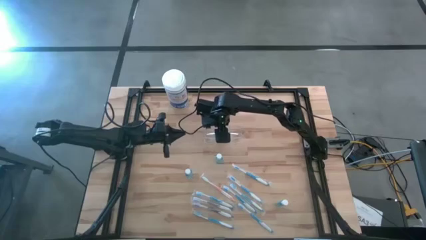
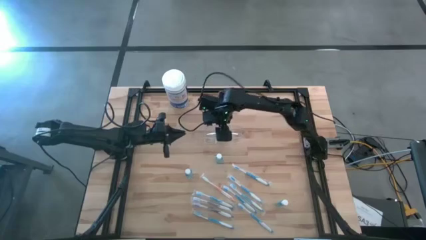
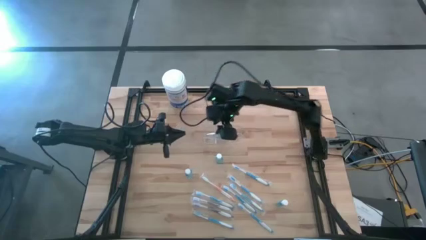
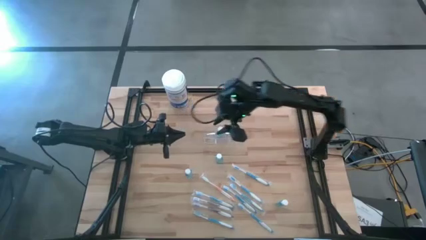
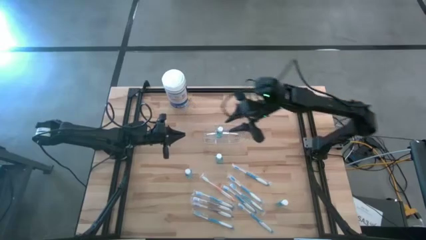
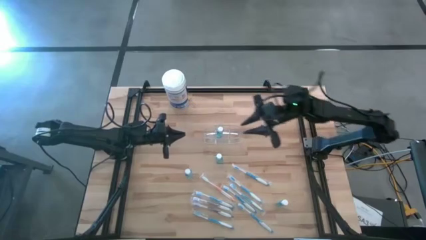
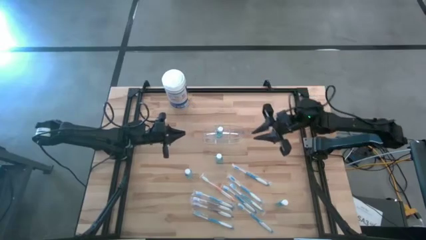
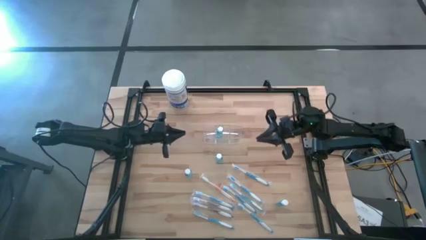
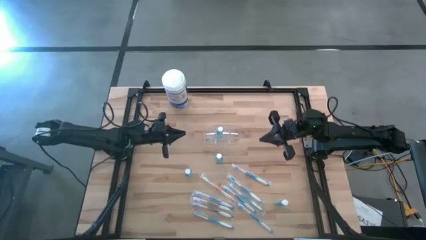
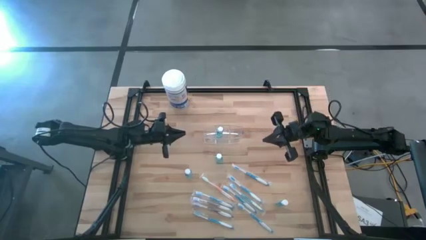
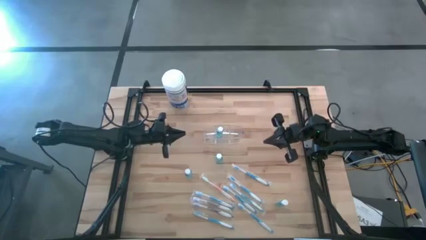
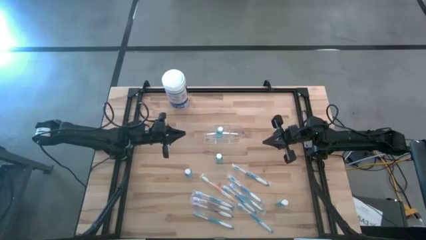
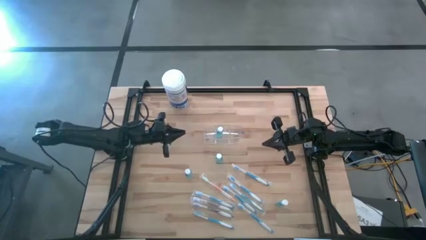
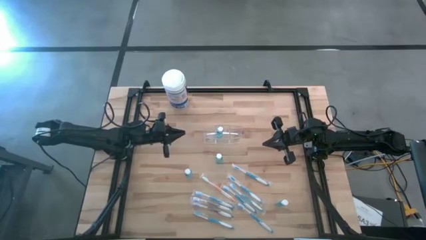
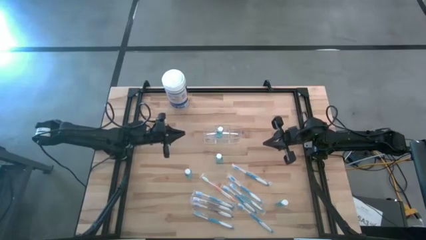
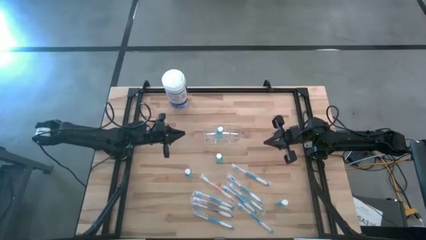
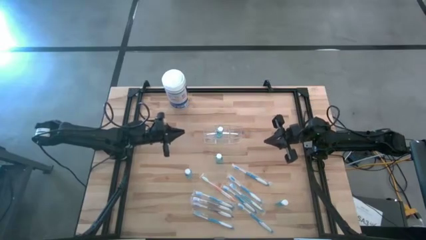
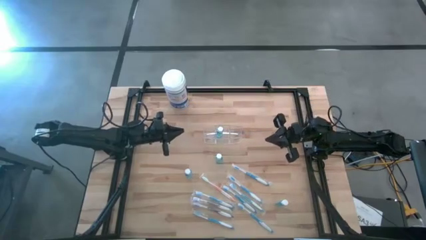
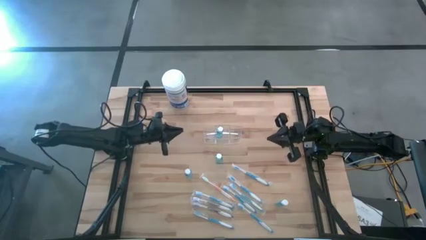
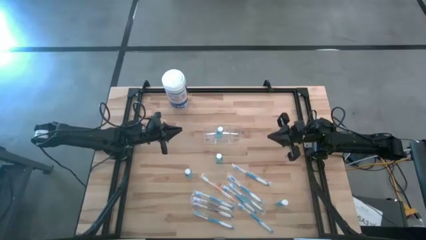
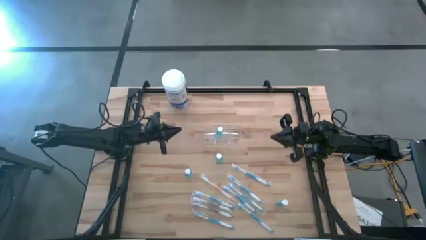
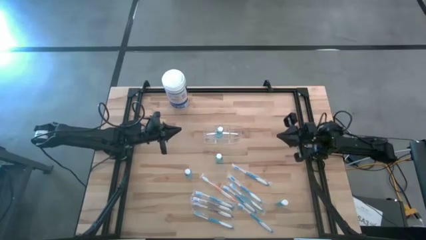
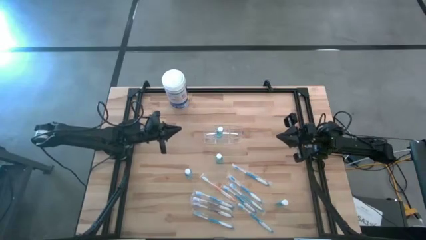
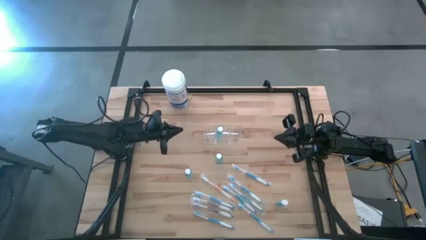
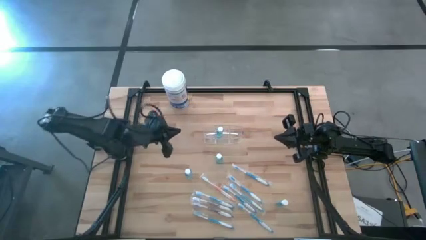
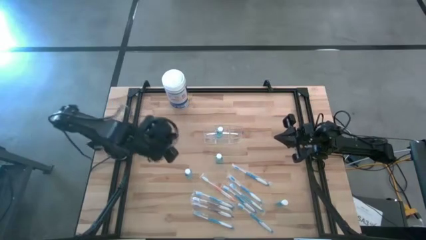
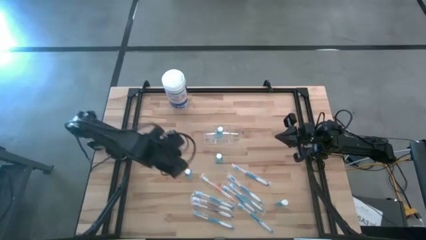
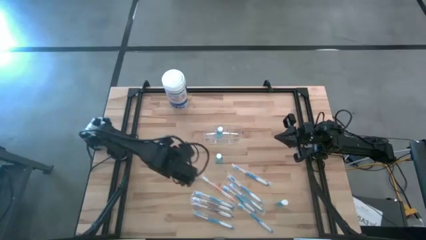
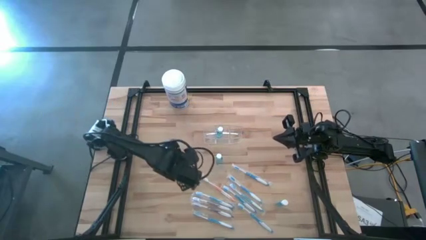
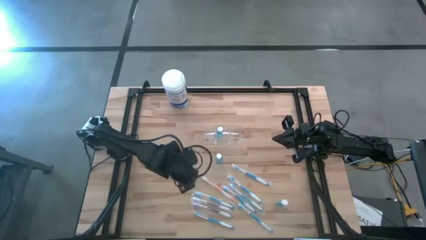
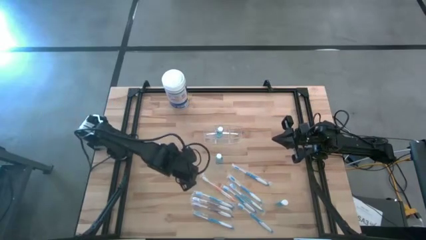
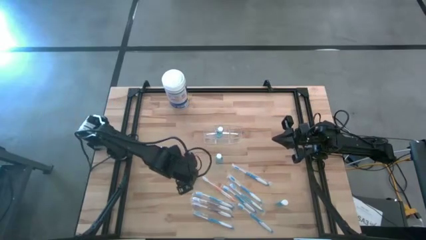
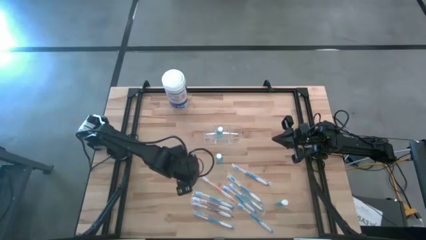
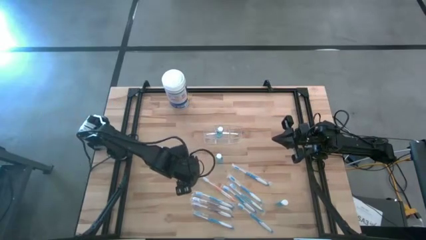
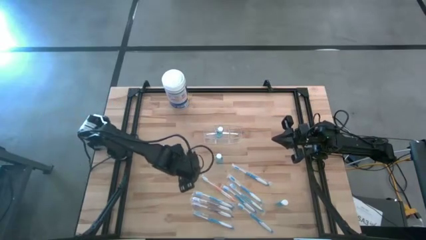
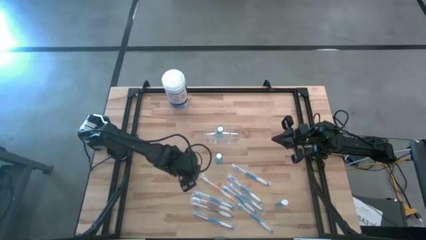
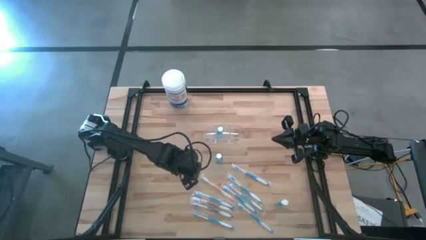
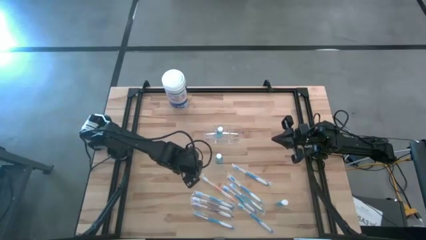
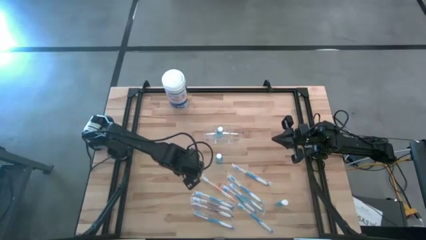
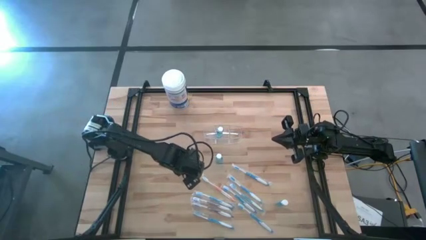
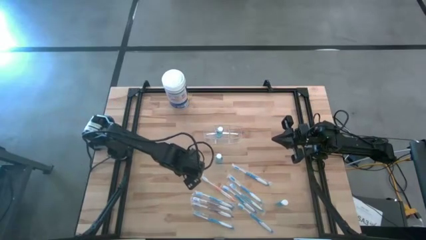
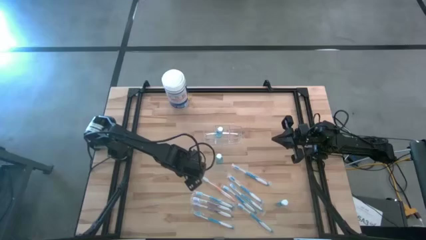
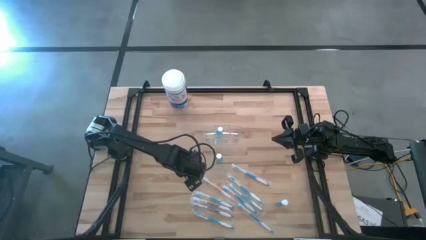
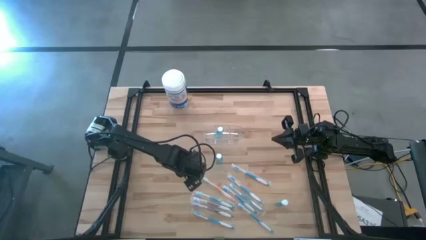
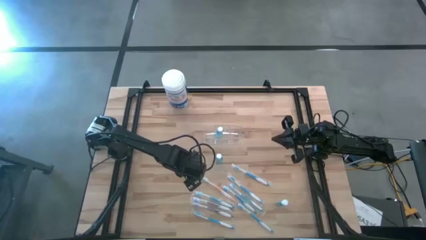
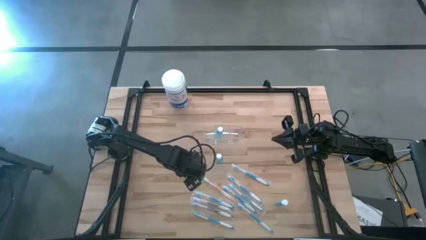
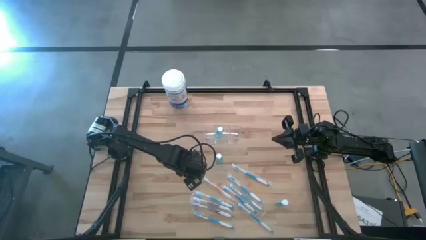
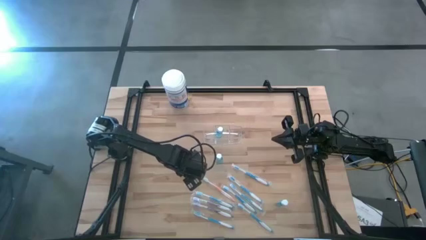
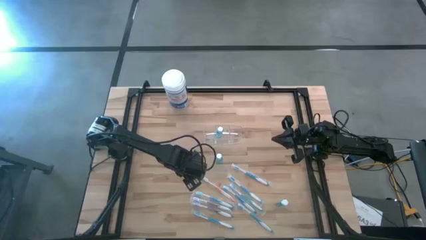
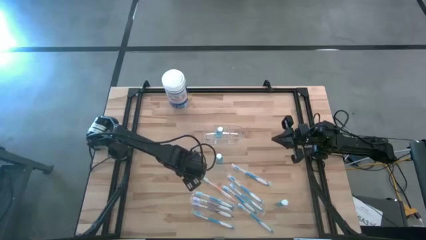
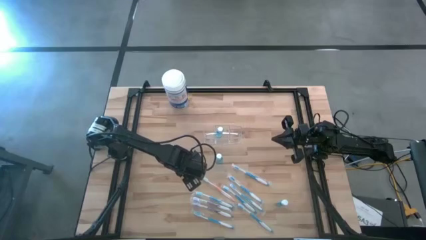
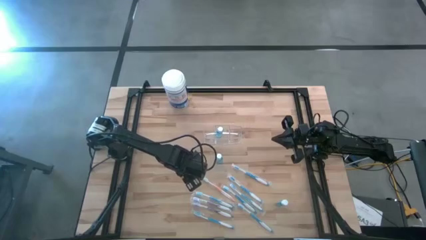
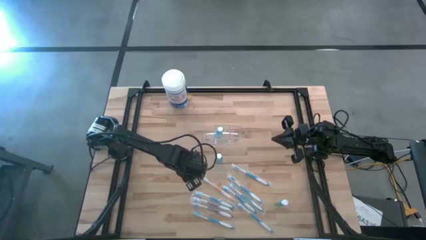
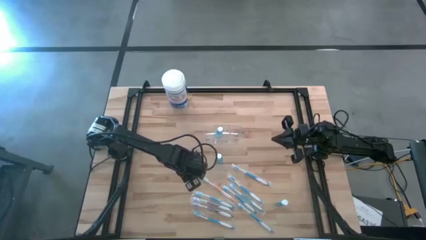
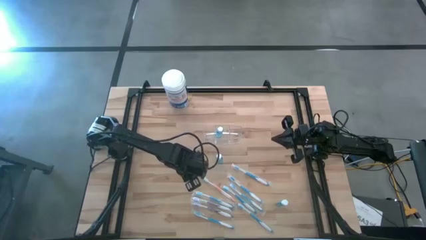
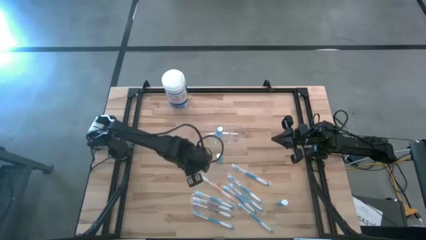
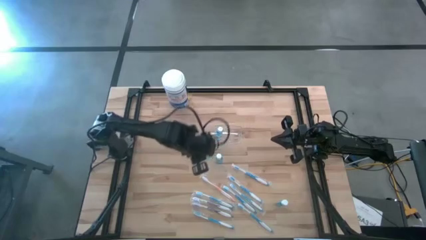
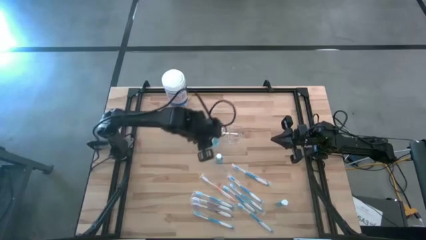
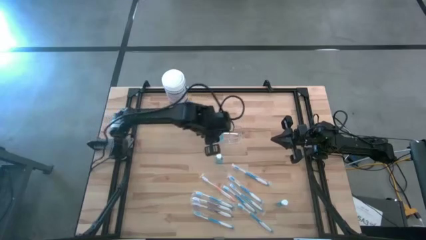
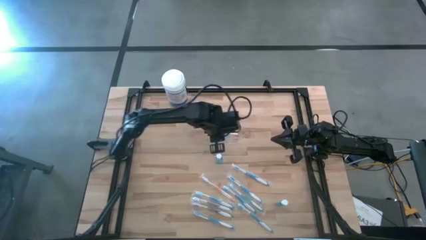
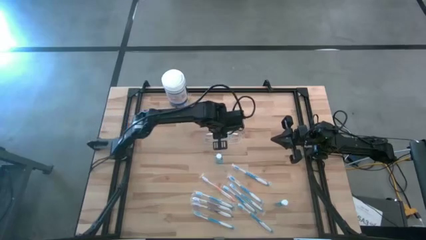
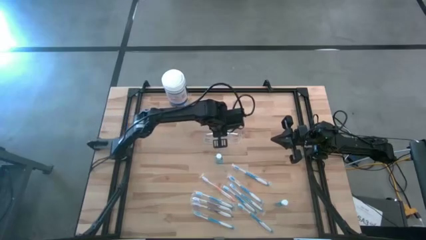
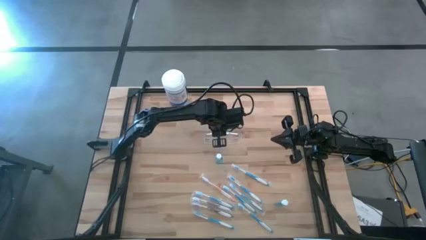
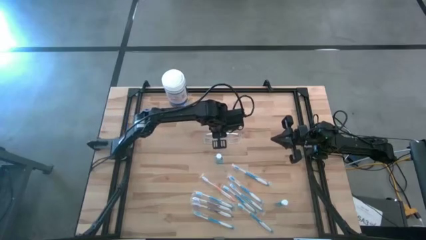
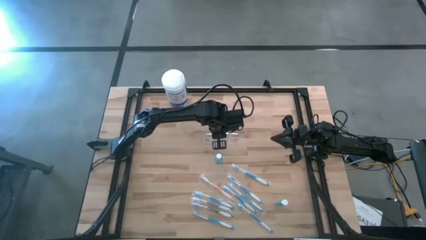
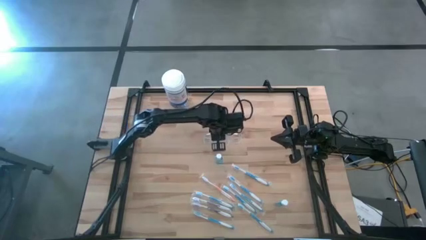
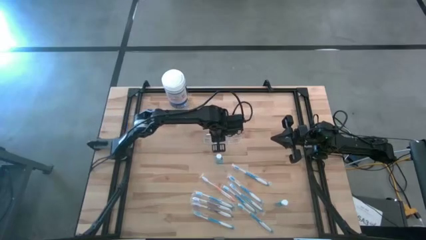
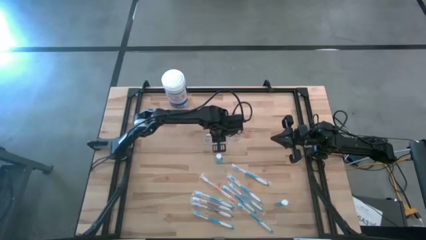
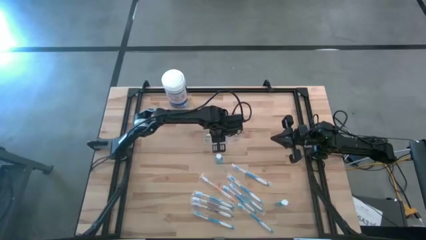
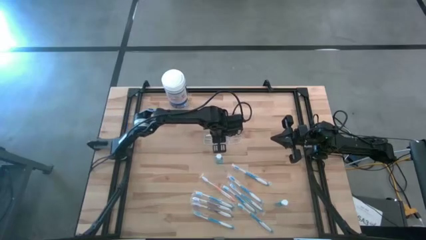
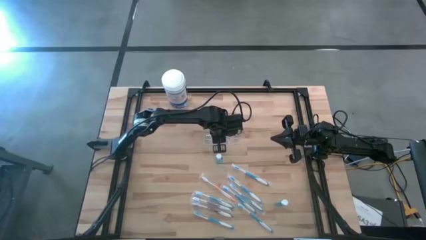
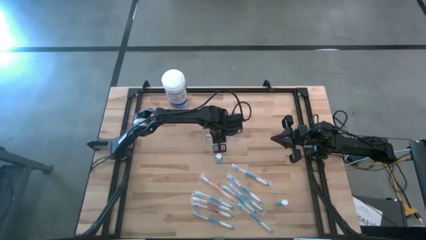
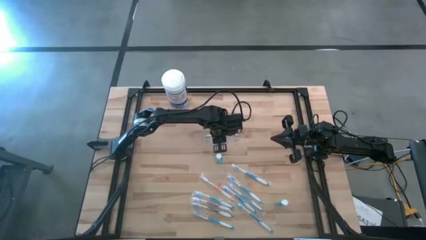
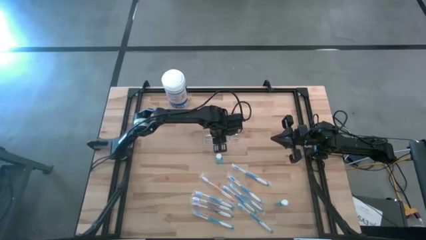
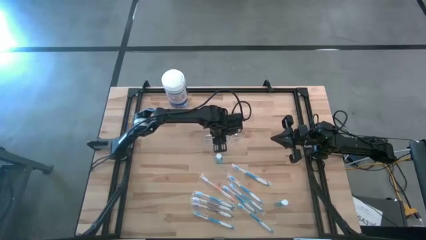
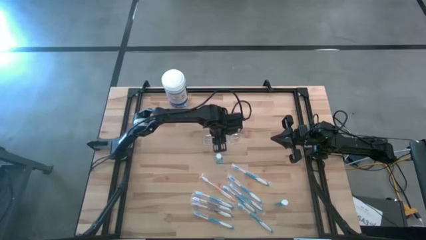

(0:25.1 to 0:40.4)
Task: Pick & Place toothbrushing station
Put the blue mouthwash in the transparent organizer
